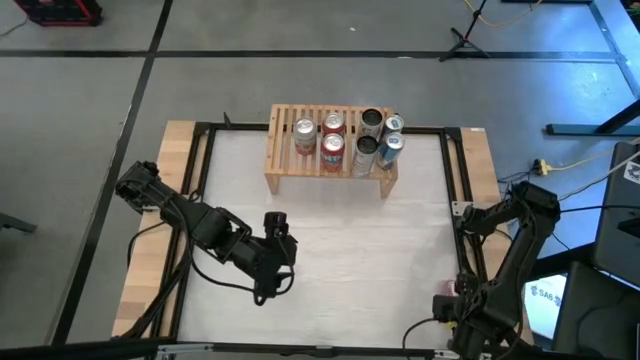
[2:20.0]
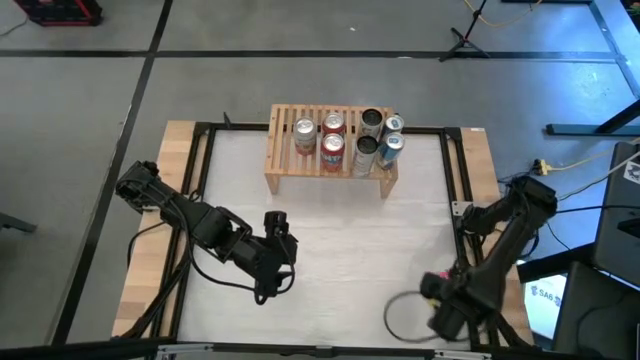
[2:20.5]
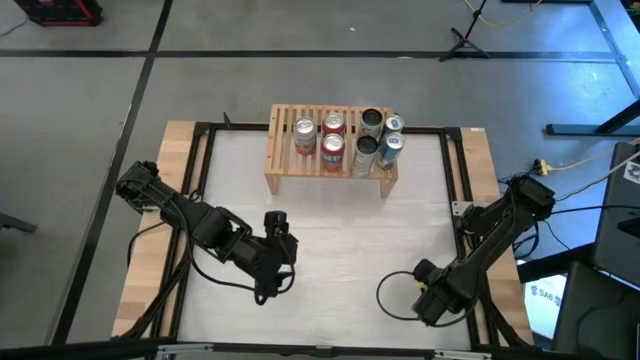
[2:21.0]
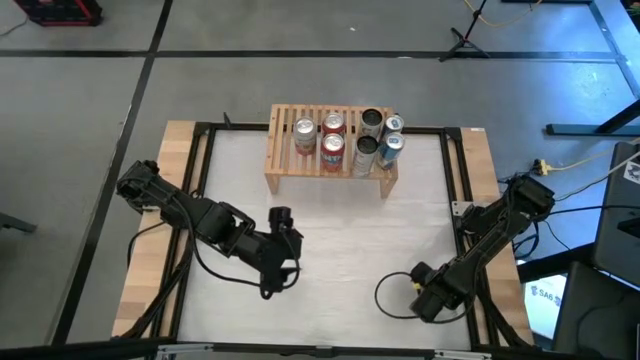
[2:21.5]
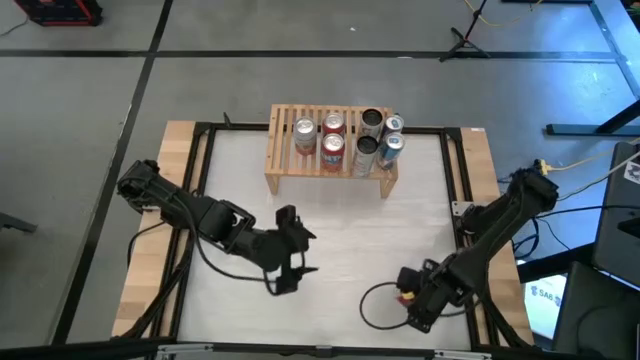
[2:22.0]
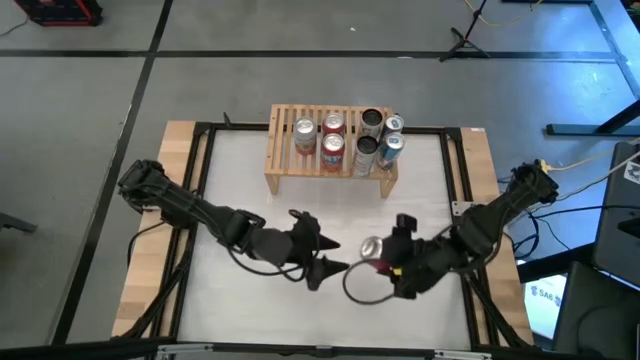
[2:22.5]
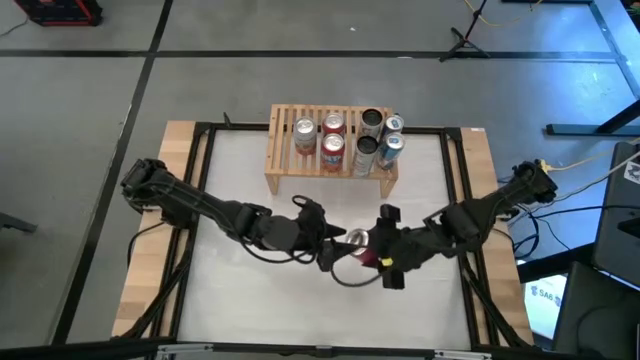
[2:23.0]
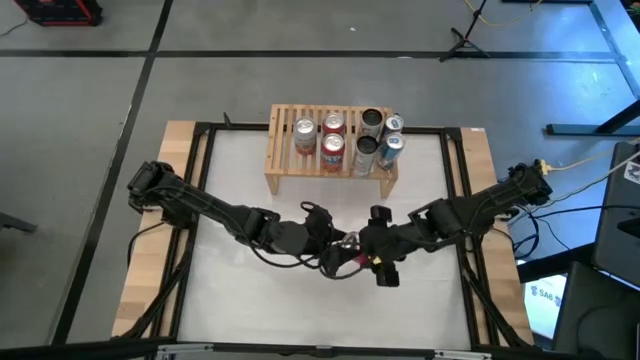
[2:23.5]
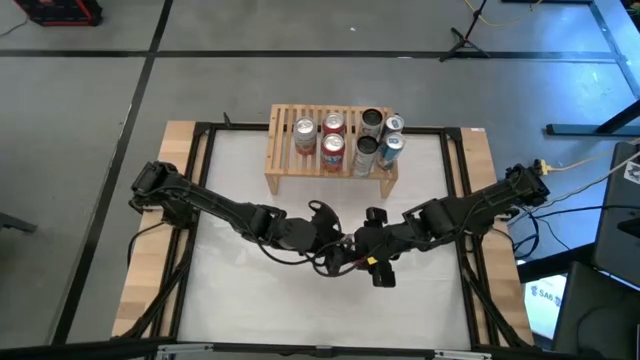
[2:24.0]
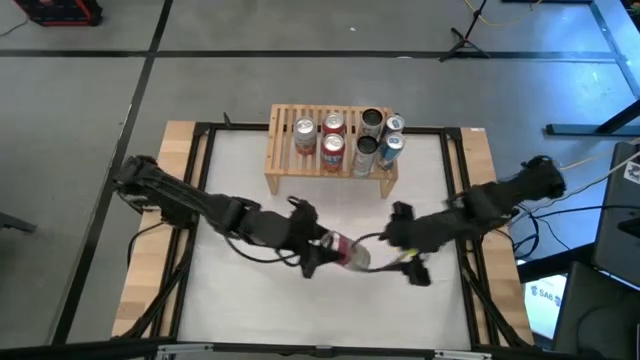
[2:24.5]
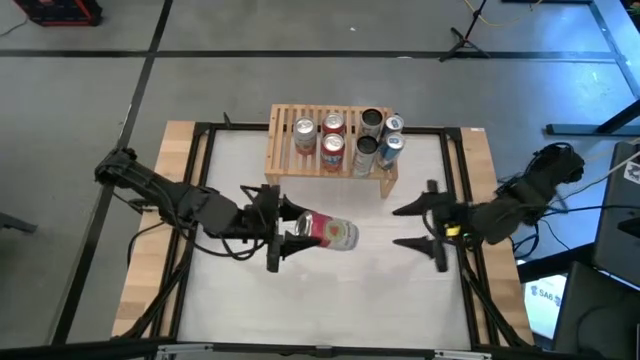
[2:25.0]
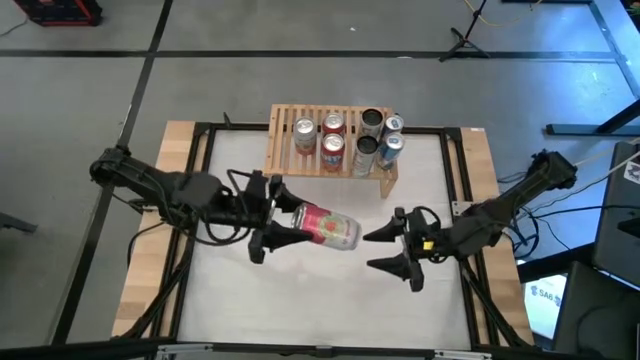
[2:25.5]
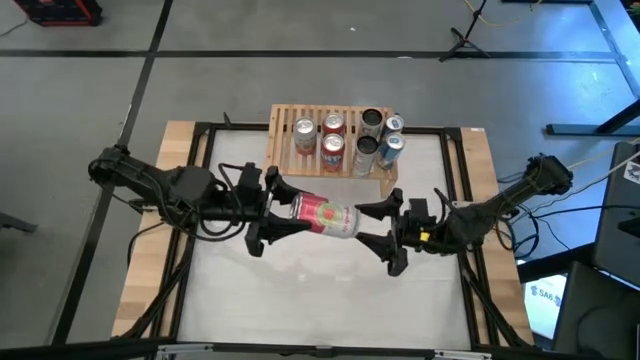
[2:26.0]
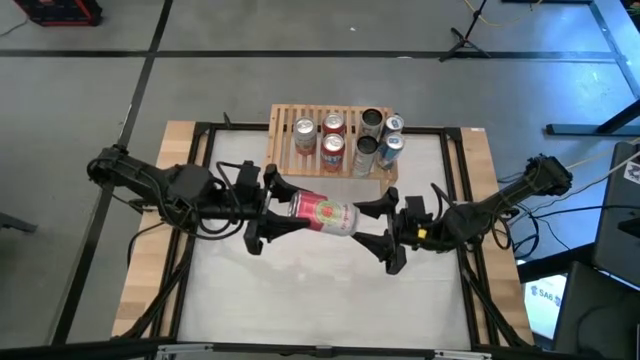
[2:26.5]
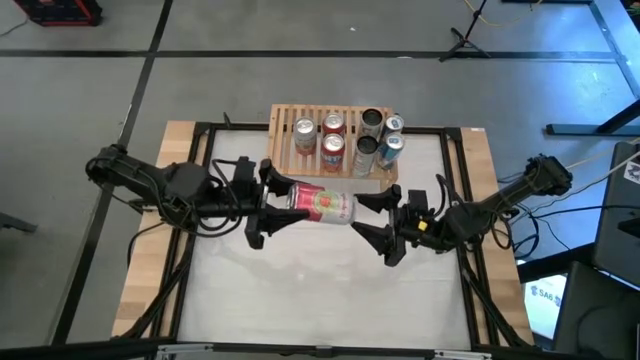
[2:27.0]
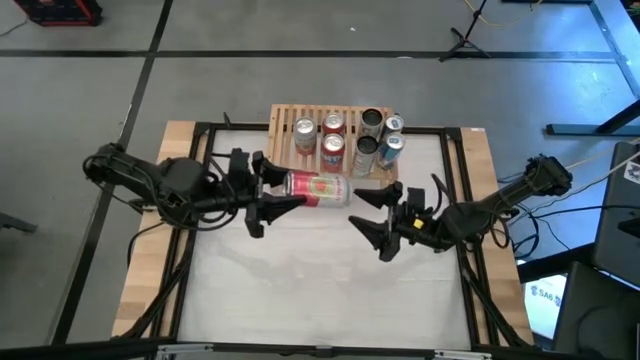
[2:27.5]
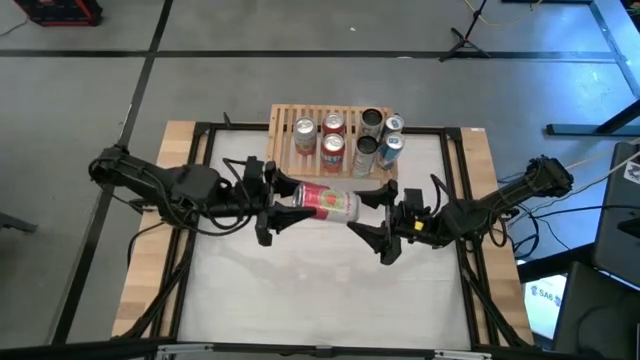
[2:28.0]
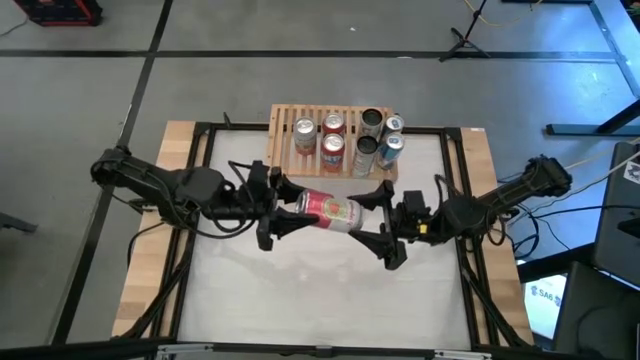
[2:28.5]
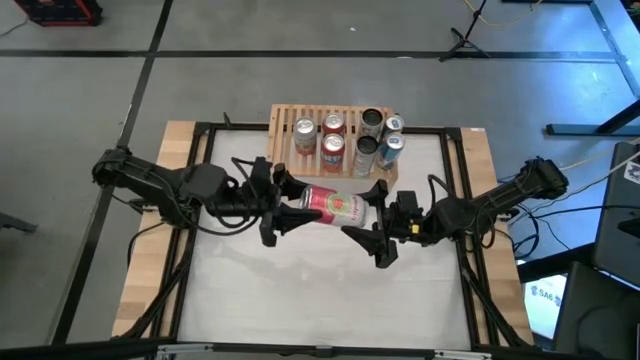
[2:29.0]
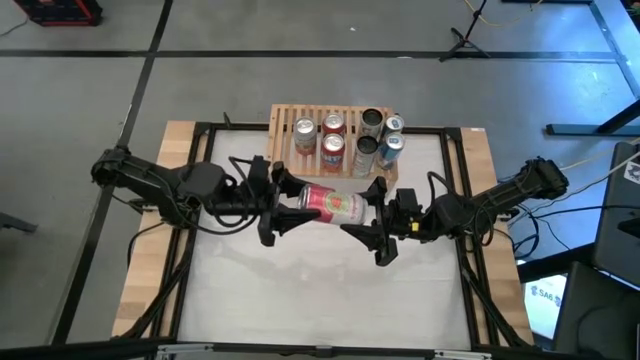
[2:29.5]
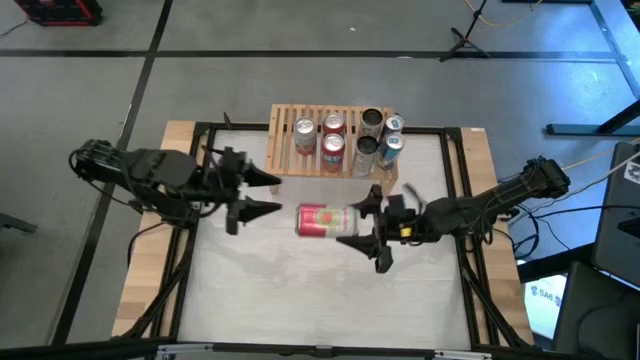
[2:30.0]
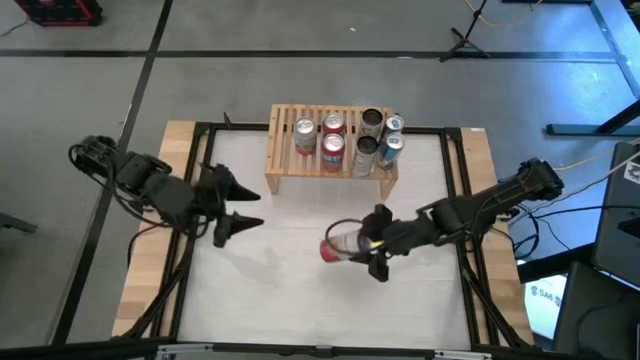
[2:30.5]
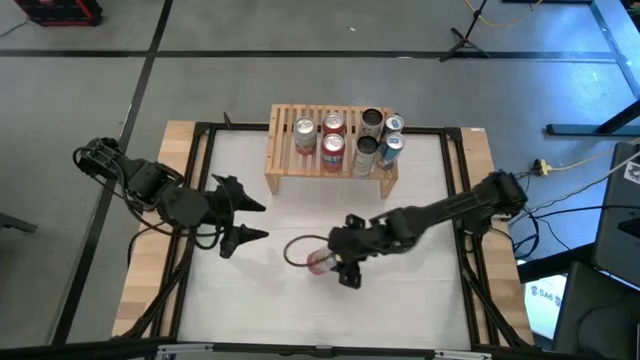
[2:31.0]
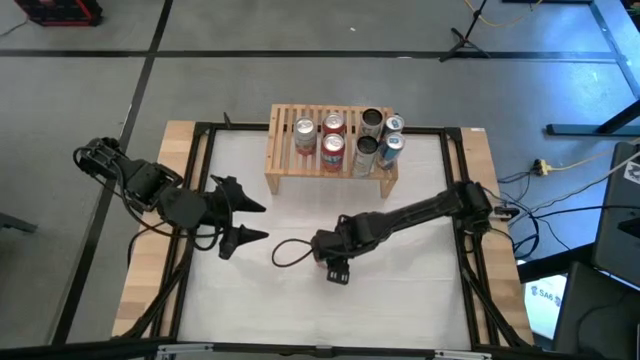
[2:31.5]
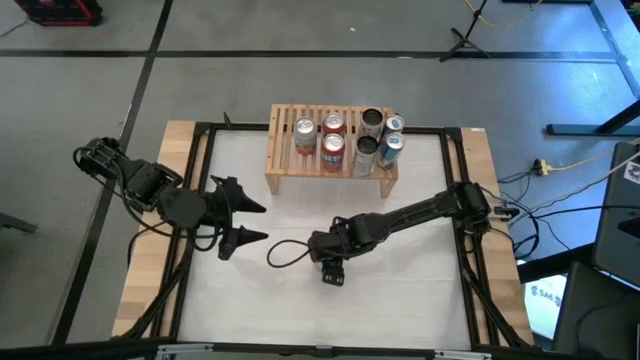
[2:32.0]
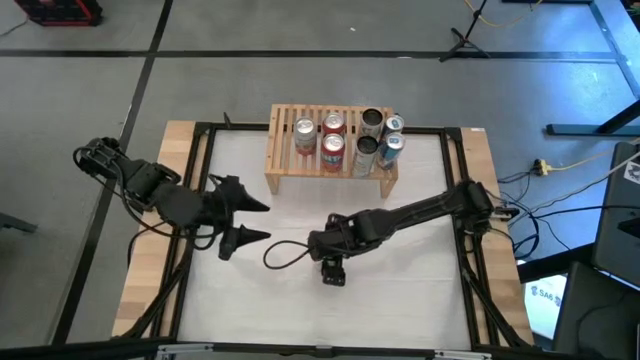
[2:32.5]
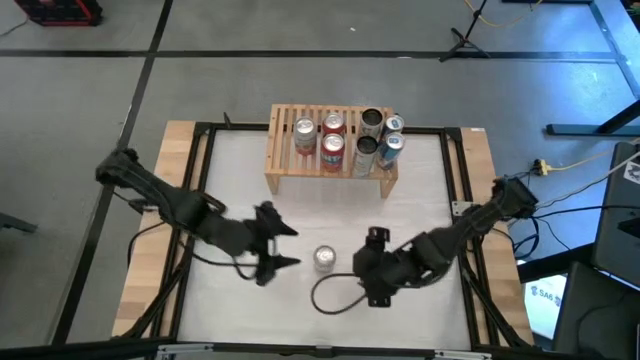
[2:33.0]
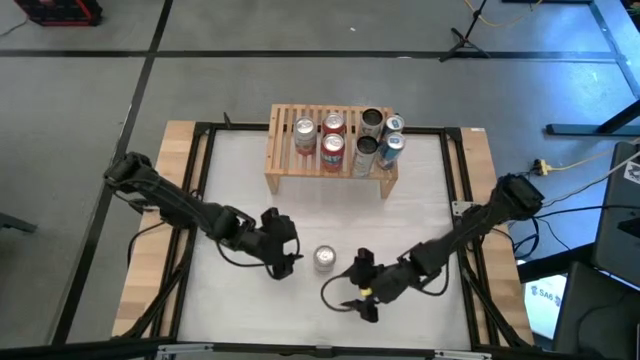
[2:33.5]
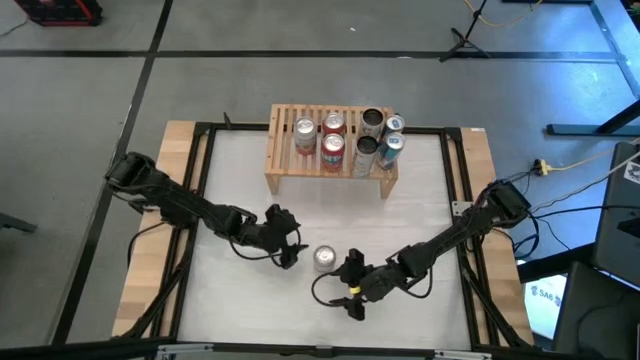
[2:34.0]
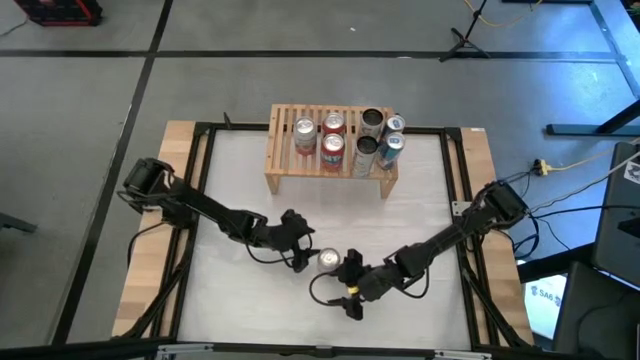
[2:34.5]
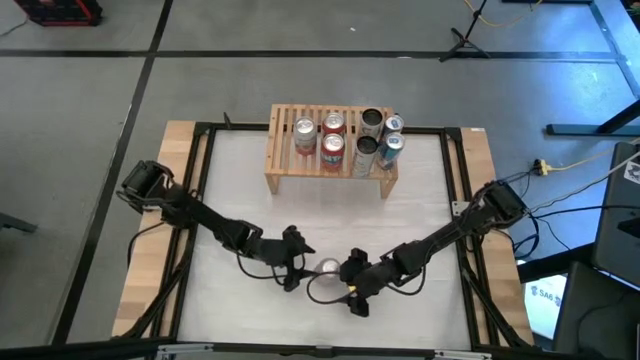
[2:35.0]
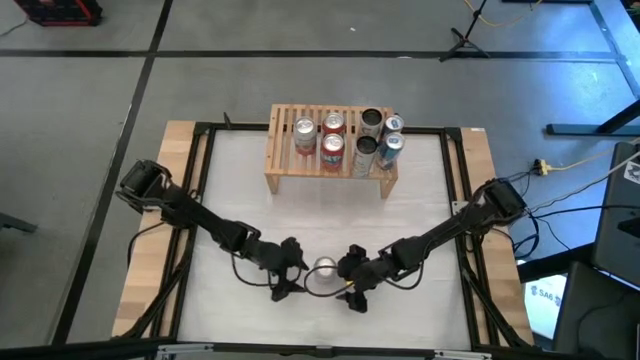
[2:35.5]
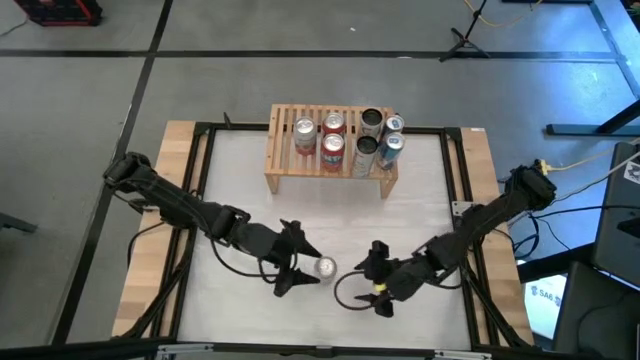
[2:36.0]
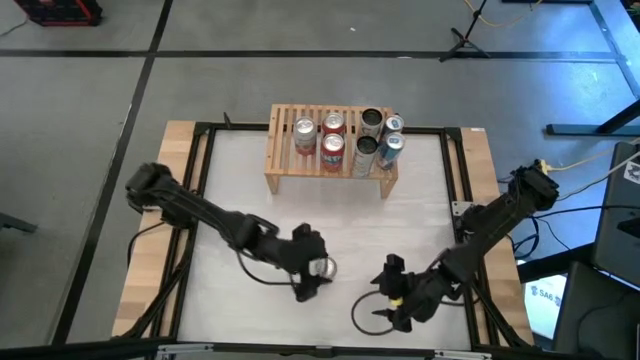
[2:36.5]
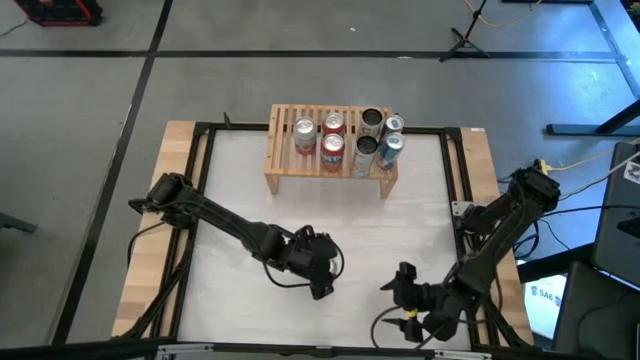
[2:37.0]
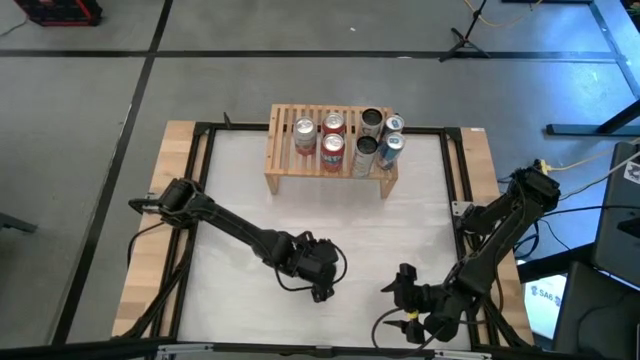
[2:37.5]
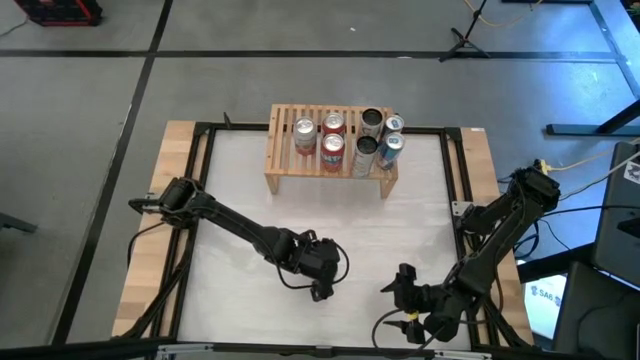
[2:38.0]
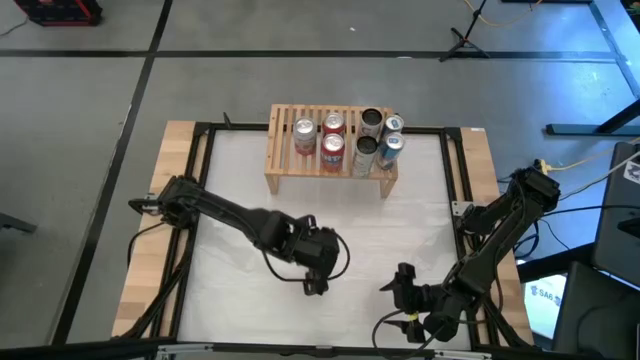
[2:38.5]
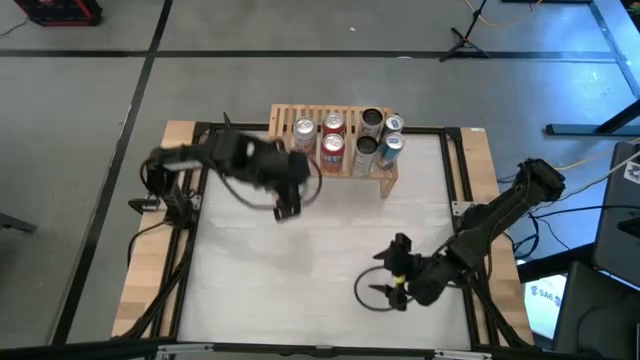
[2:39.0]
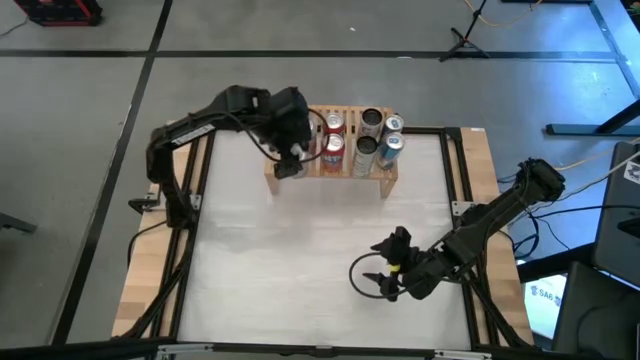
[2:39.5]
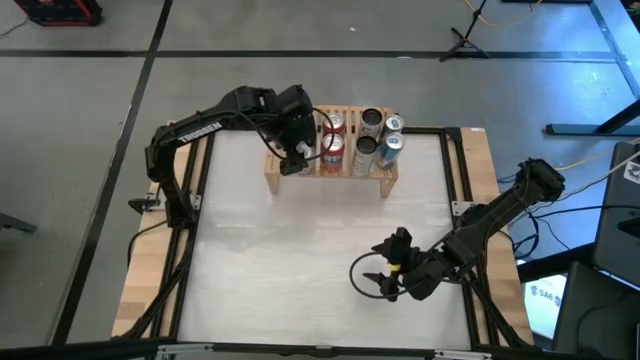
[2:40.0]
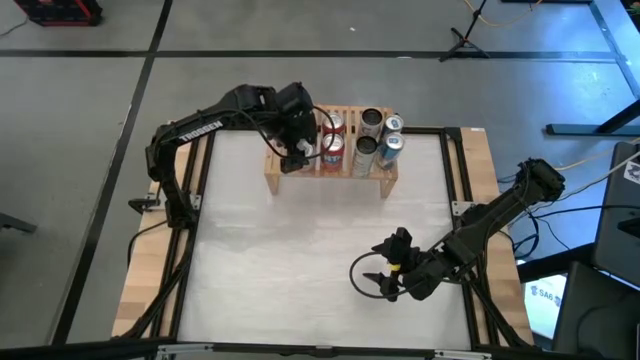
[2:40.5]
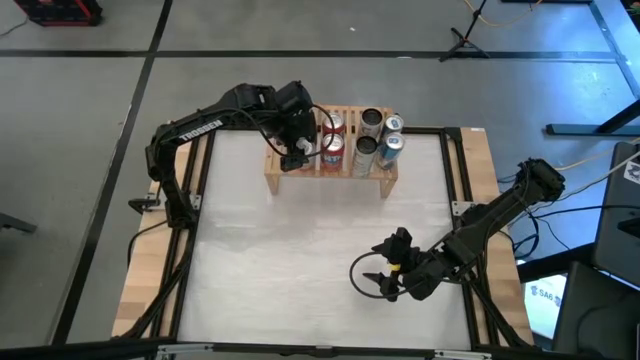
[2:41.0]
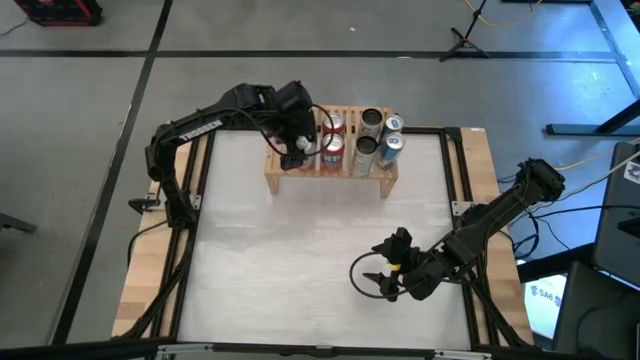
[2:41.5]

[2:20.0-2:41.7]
Task: Place canned beverage on shelf
Put the pink soda can on the shelf aligned with the other pink soda can
